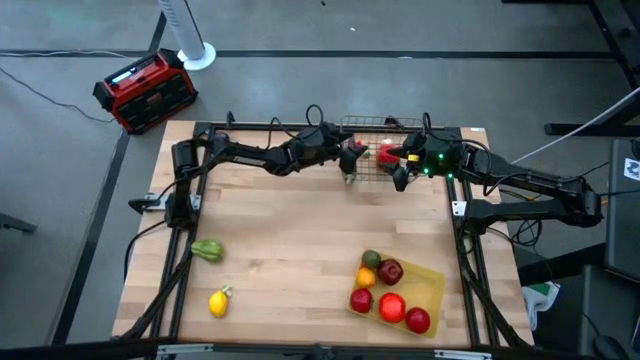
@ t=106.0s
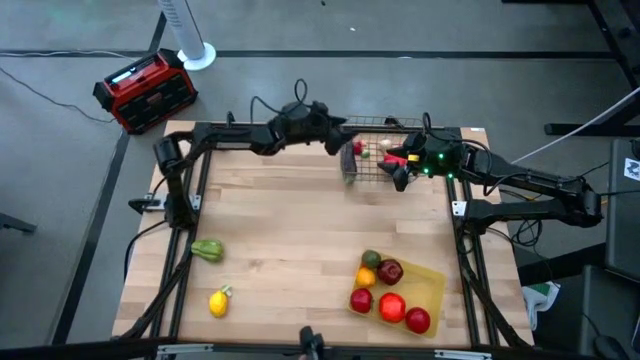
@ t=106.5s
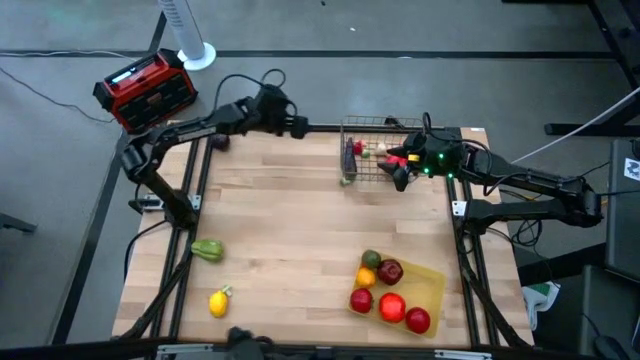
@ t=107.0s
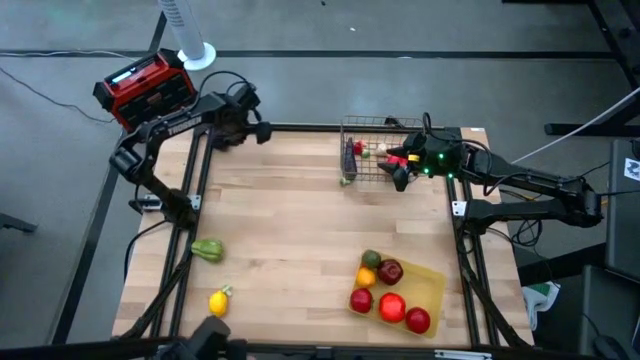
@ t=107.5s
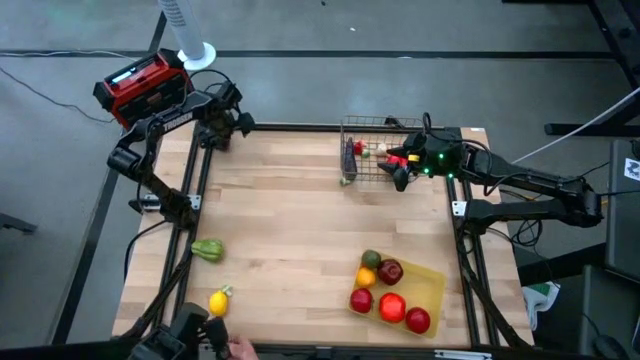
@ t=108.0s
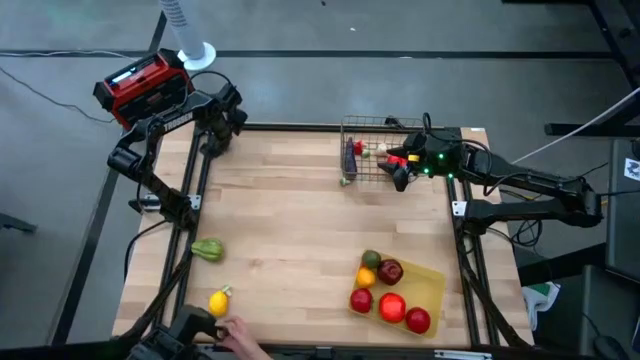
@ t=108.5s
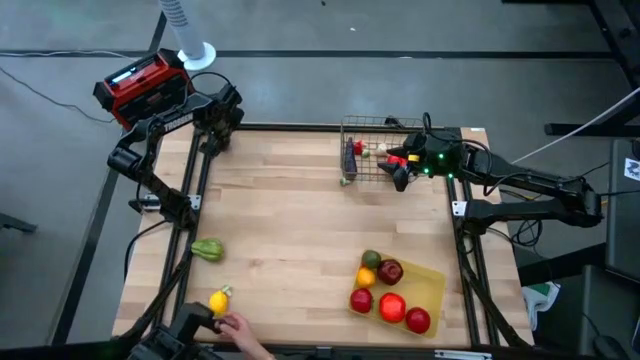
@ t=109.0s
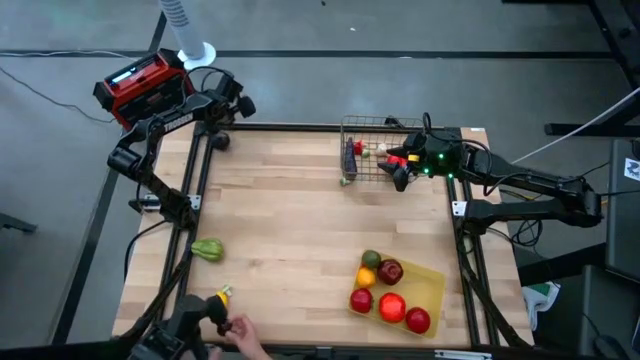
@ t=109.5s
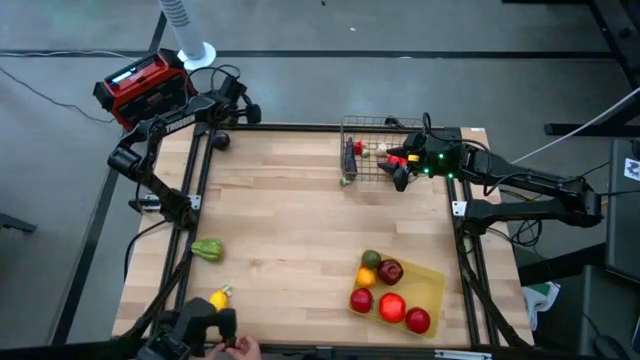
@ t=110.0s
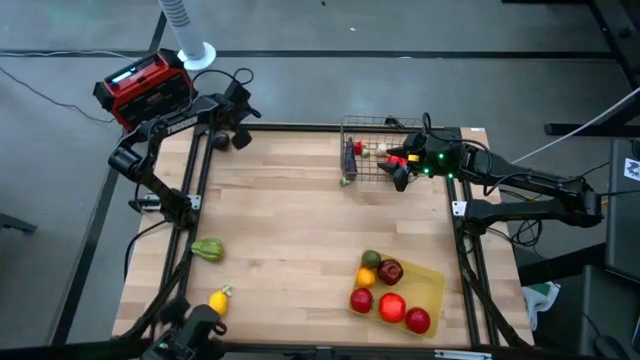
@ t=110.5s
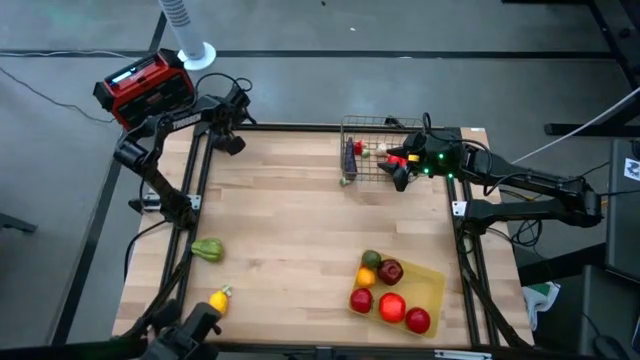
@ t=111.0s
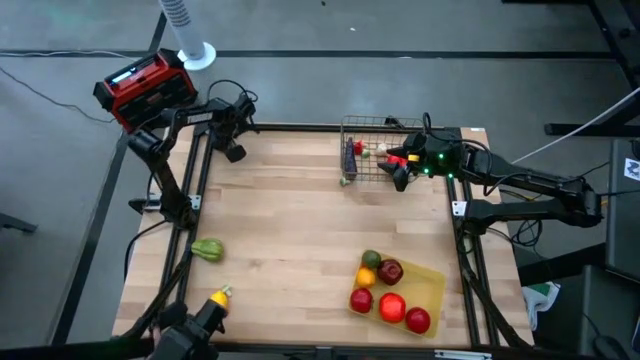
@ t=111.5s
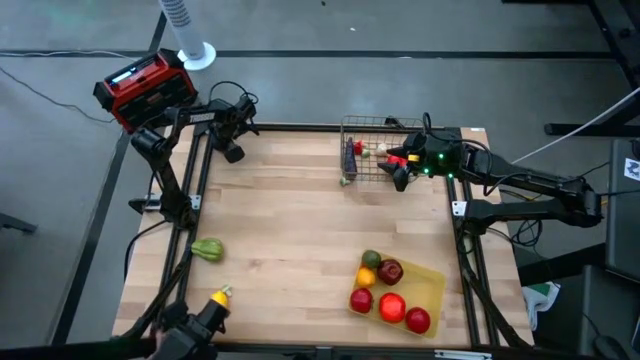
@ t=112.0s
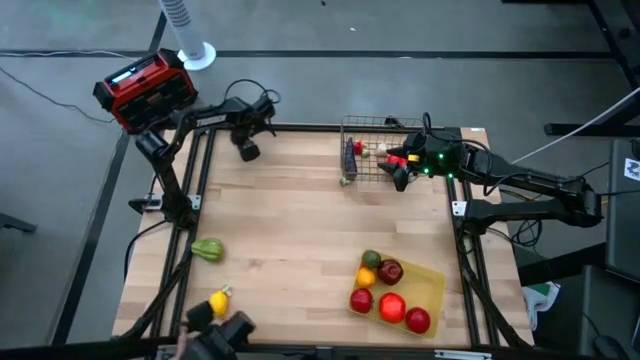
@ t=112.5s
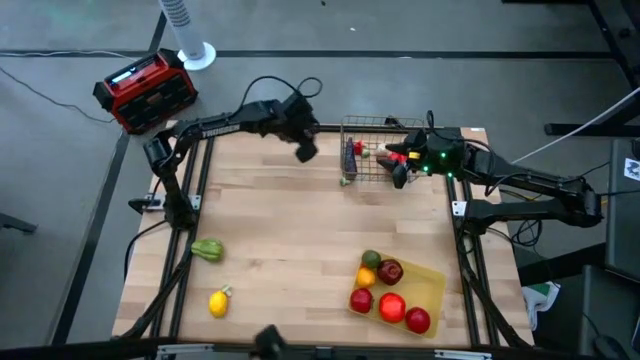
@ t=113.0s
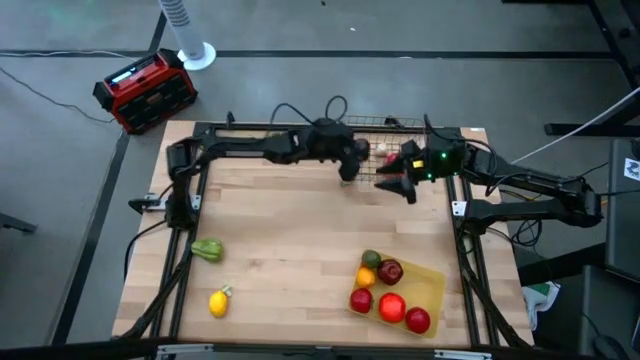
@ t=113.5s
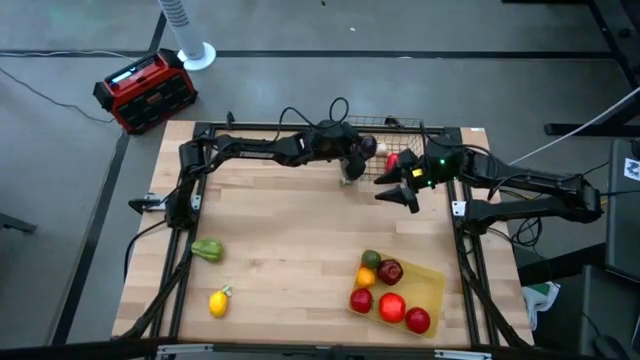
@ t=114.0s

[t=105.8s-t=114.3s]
Task: Sort produce into baskets
Put the onion into the wire basket

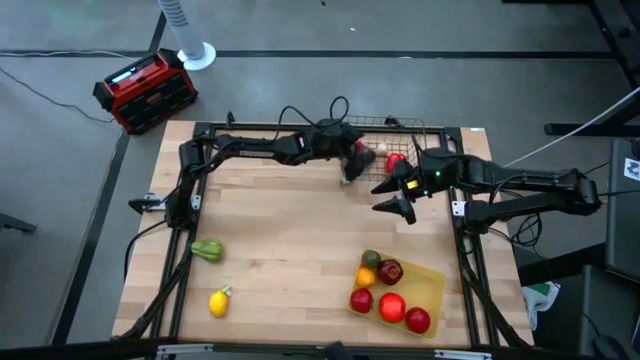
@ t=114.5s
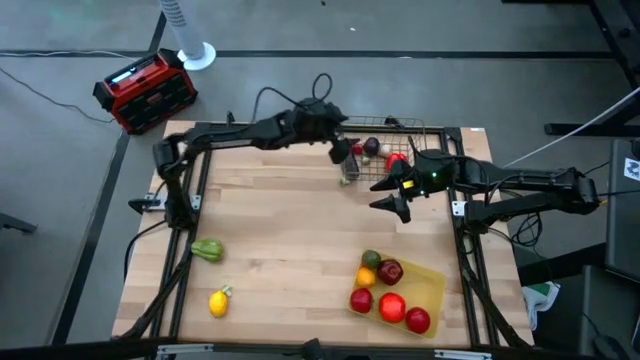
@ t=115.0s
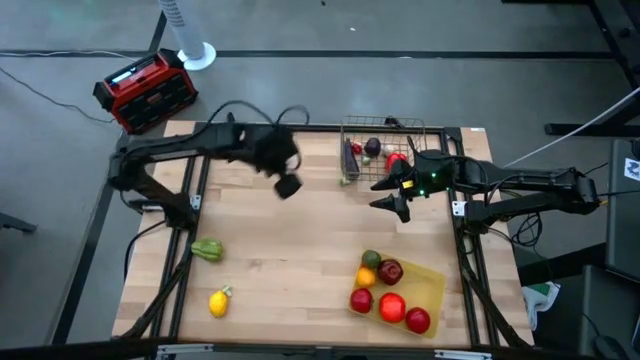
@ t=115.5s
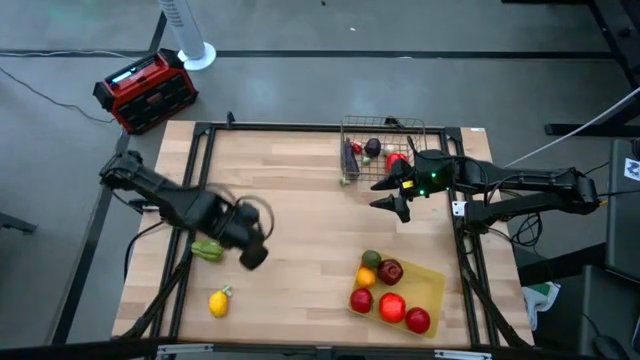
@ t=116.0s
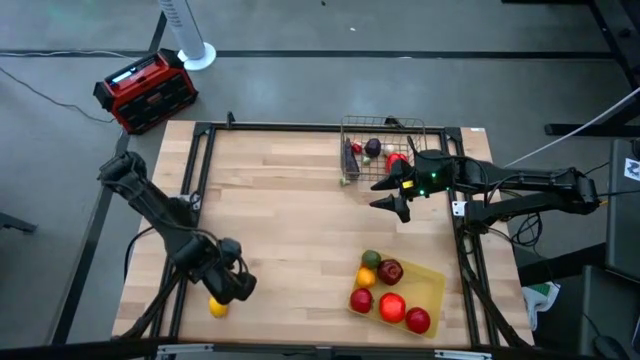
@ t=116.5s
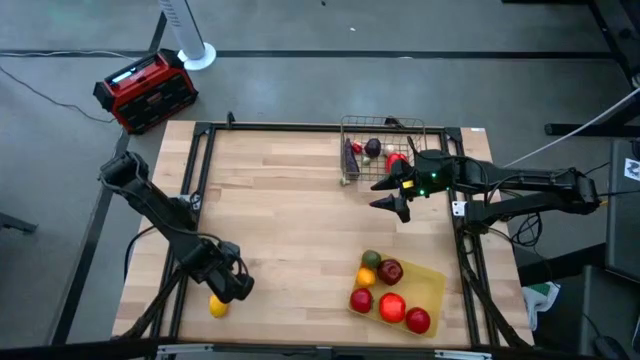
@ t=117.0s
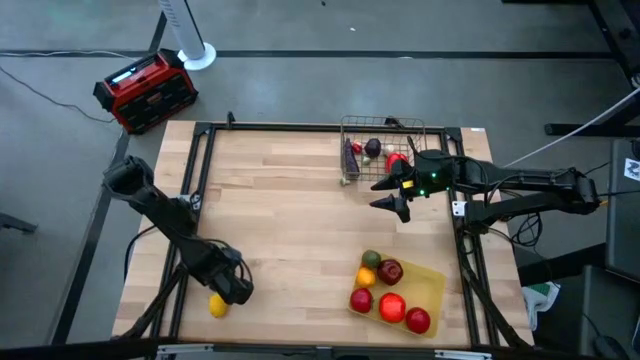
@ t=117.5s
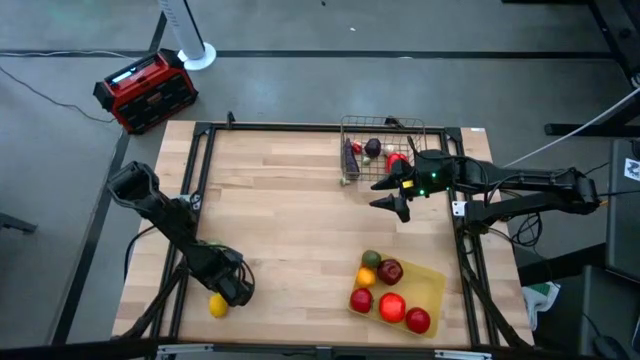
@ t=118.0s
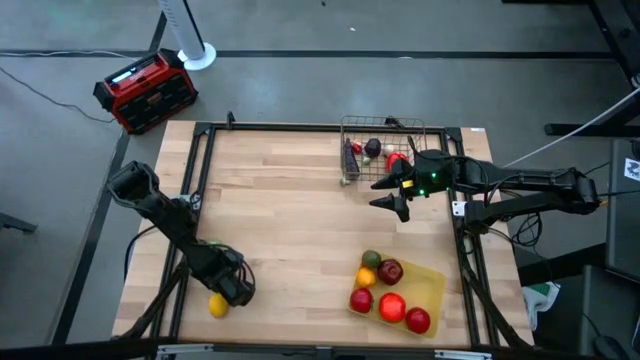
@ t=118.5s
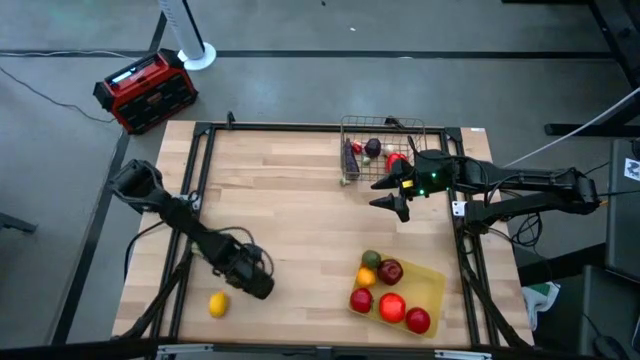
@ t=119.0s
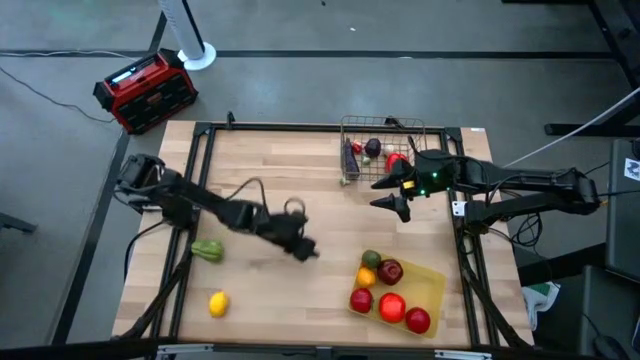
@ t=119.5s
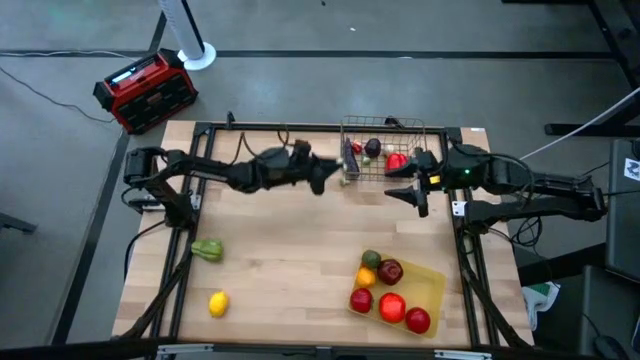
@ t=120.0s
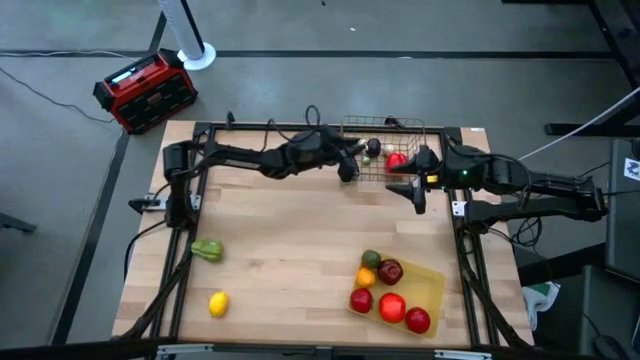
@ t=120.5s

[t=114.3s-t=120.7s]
Put the bottom green mushroom into the wire basket

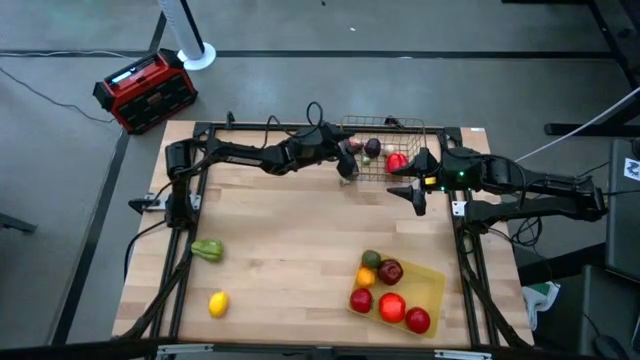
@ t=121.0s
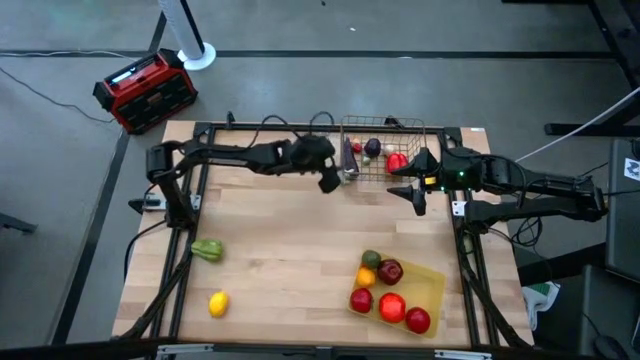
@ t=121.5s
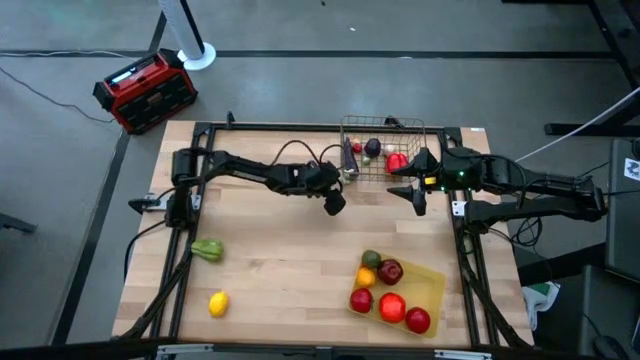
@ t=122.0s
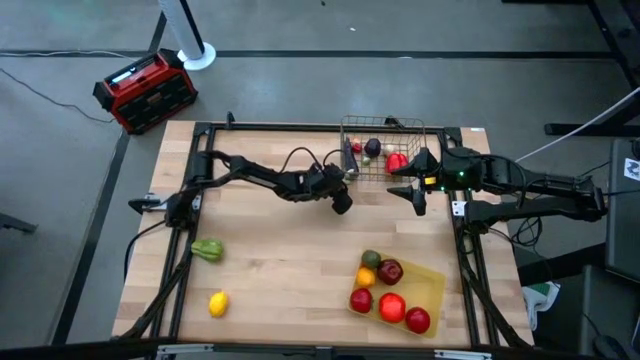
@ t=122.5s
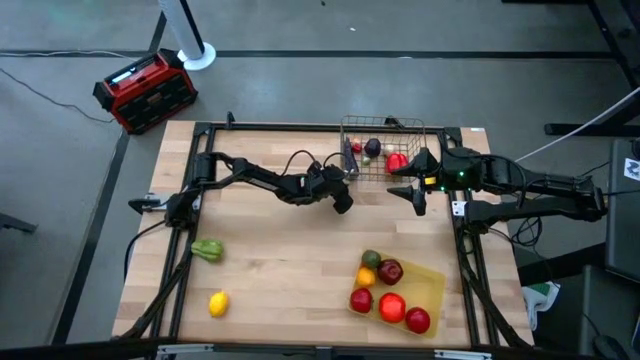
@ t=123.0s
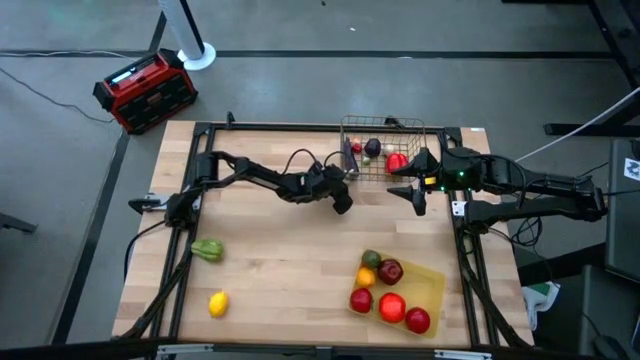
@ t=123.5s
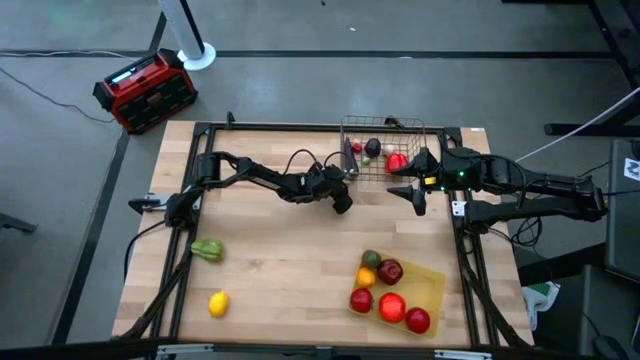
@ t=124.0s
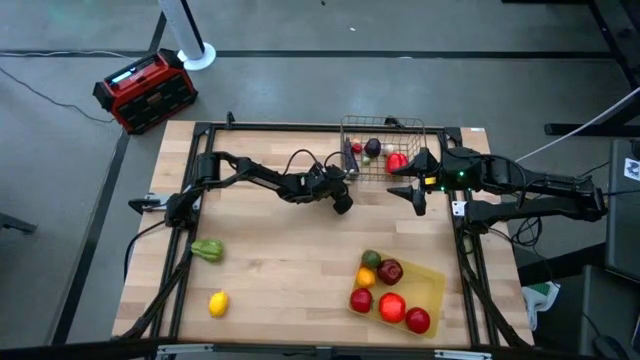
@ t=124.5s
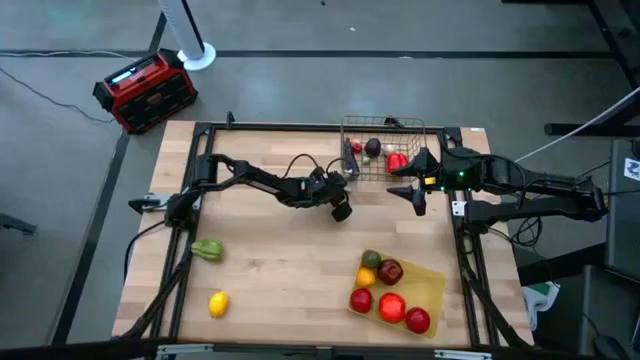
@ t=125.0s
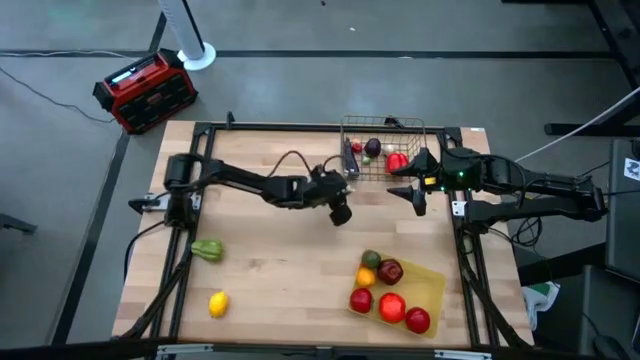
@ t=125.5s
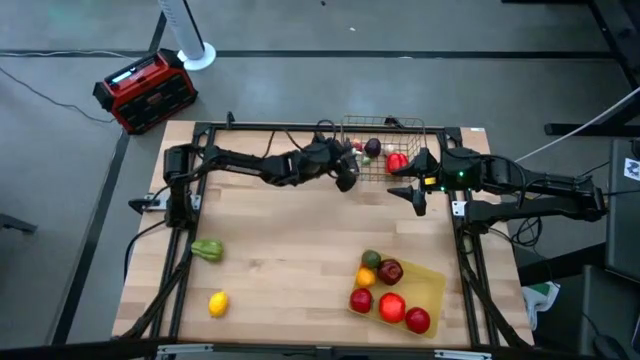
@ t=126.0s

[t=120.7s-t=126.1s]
Put the green mushroom into the wire basket
